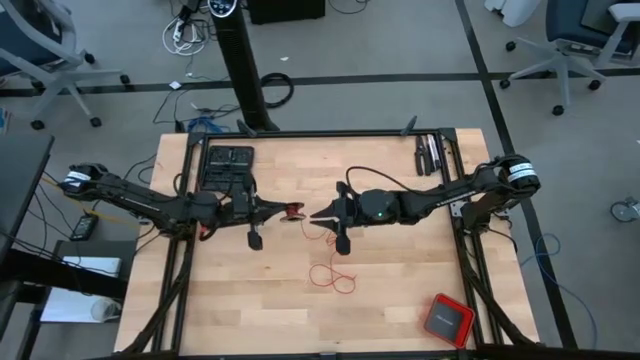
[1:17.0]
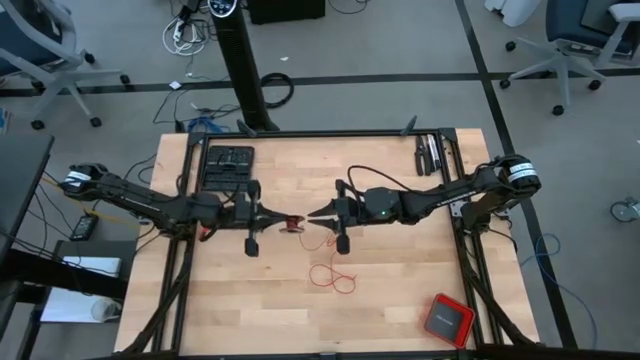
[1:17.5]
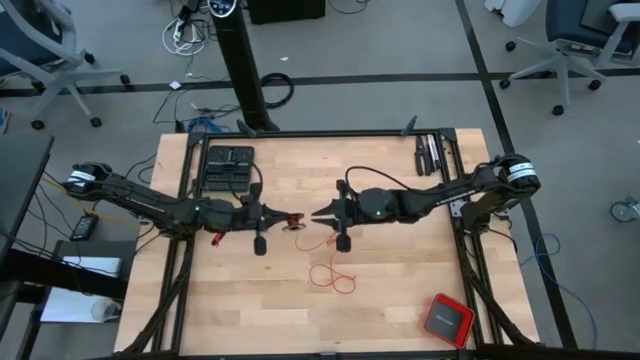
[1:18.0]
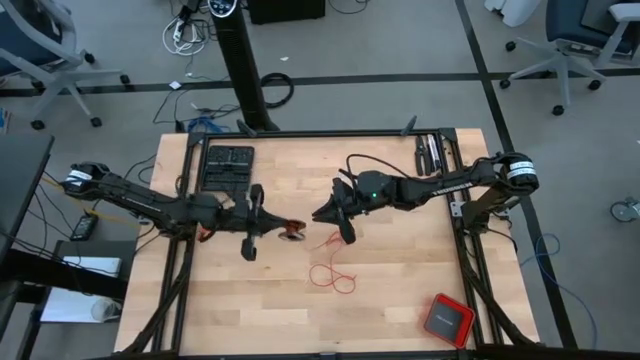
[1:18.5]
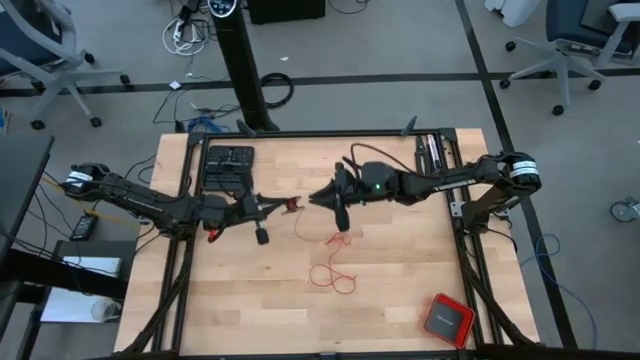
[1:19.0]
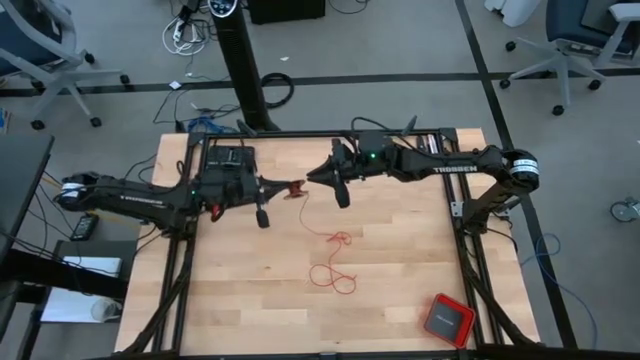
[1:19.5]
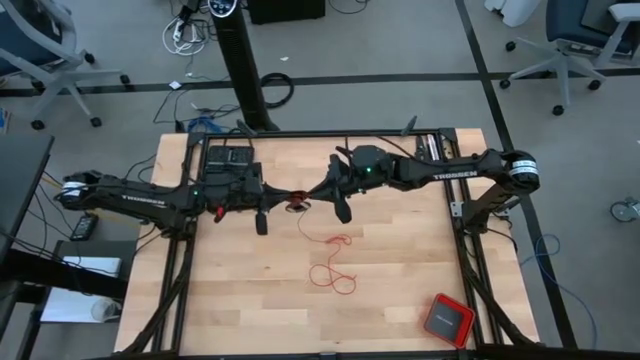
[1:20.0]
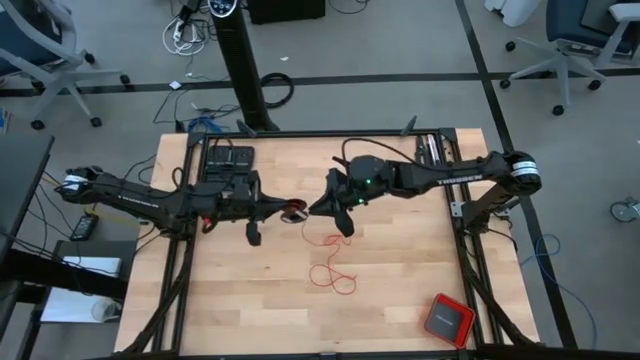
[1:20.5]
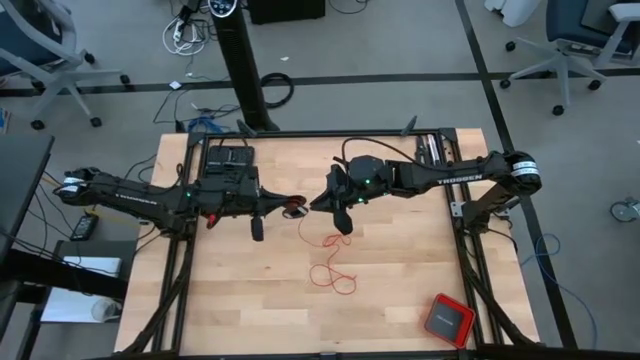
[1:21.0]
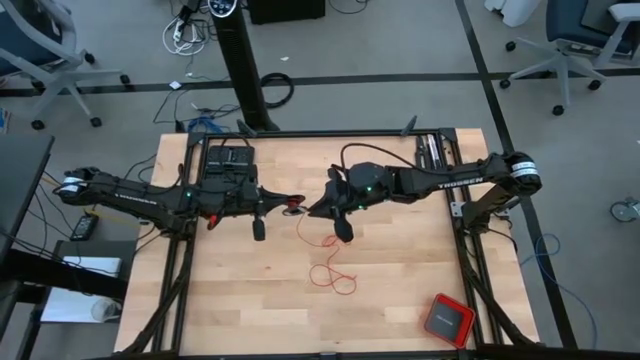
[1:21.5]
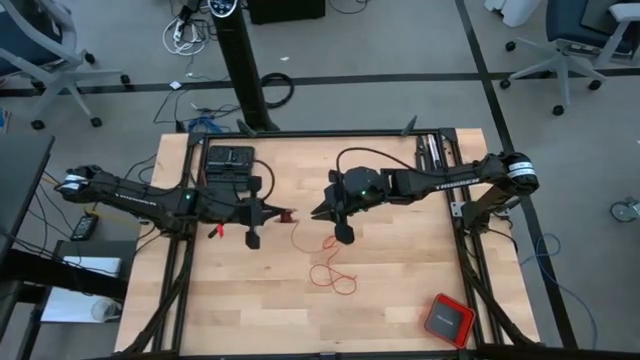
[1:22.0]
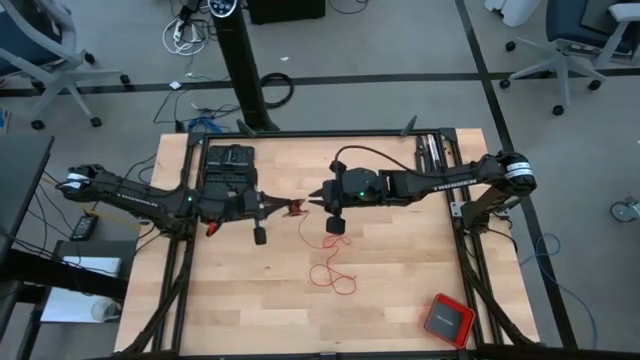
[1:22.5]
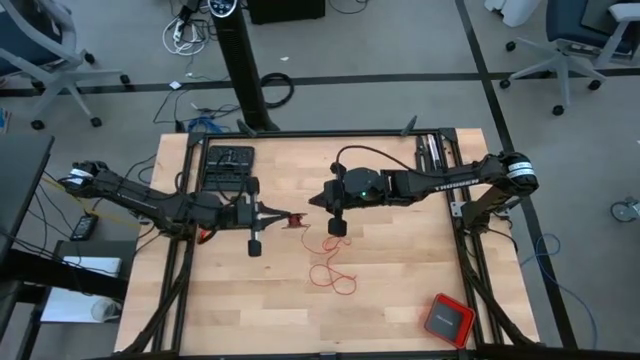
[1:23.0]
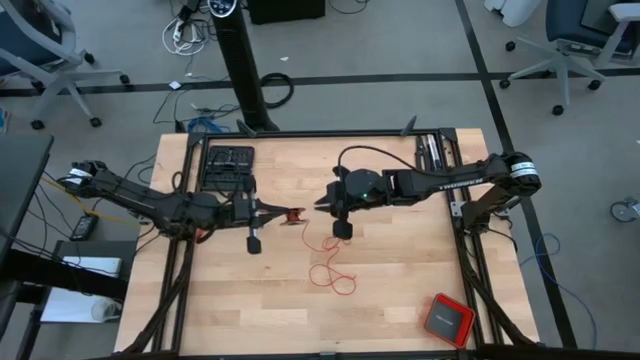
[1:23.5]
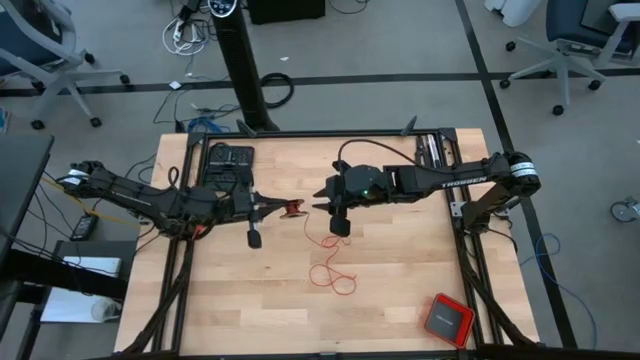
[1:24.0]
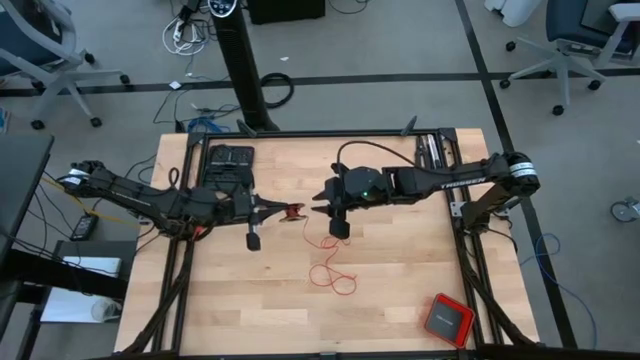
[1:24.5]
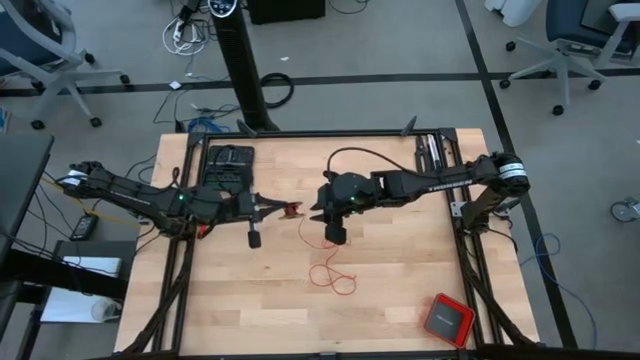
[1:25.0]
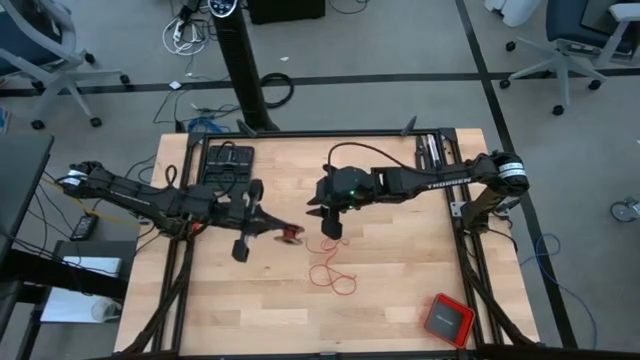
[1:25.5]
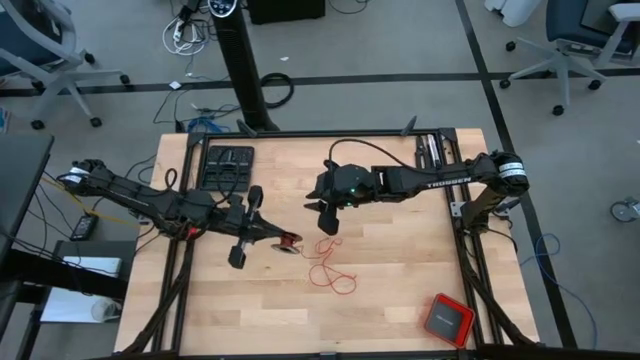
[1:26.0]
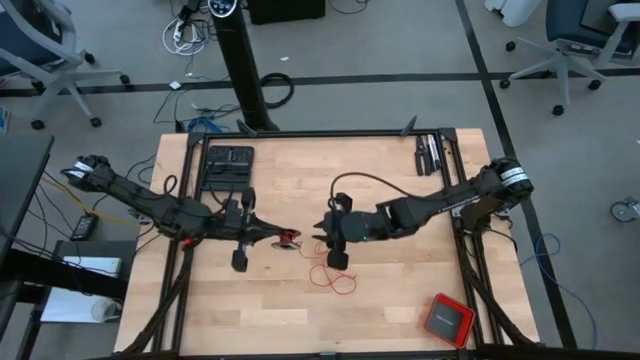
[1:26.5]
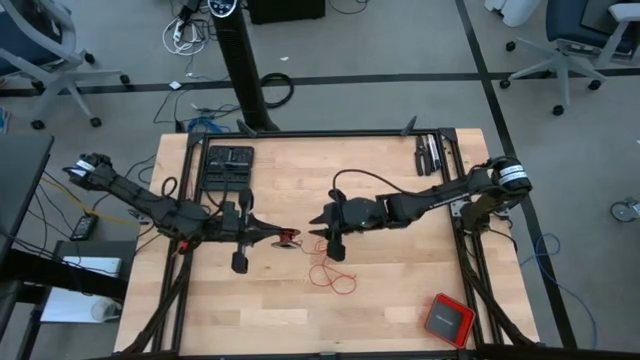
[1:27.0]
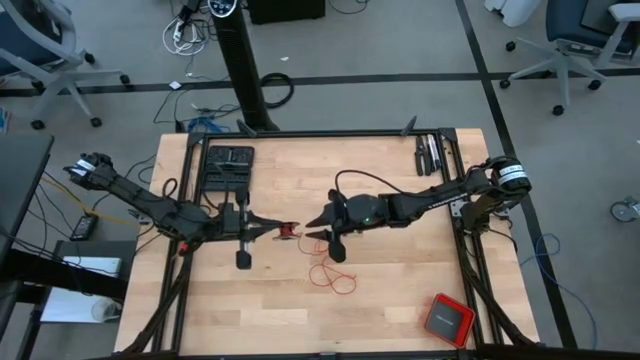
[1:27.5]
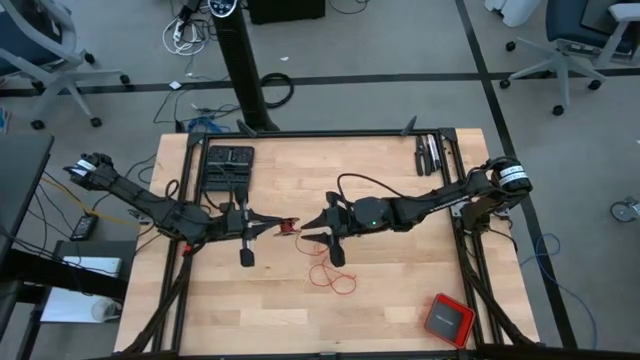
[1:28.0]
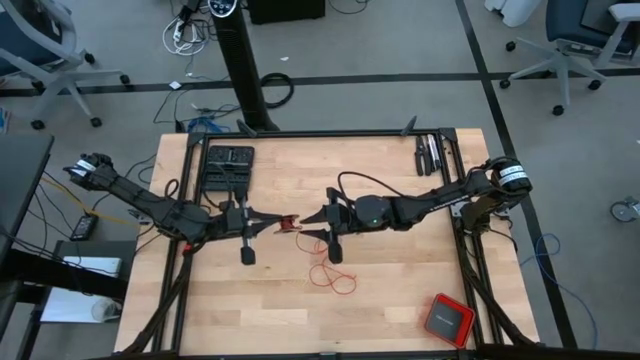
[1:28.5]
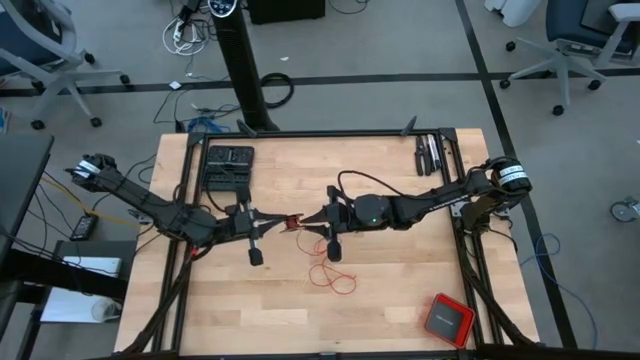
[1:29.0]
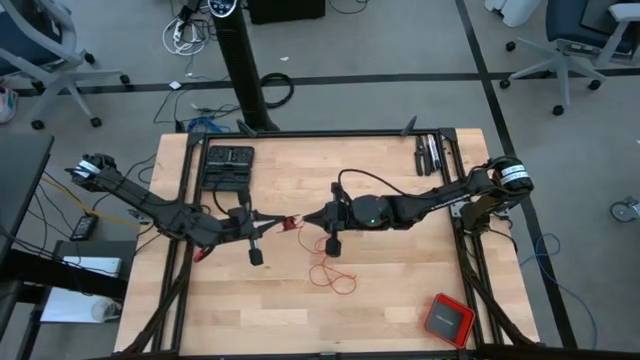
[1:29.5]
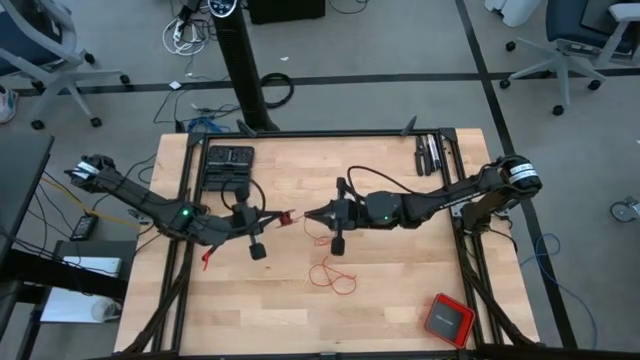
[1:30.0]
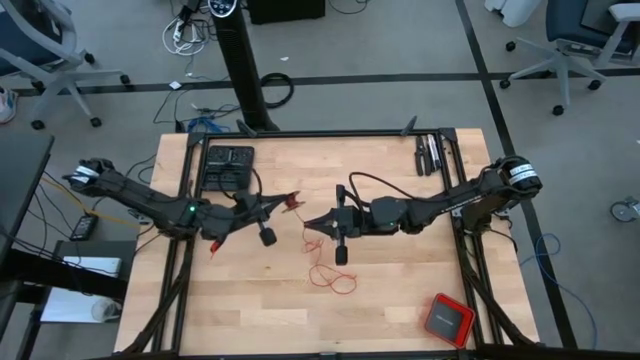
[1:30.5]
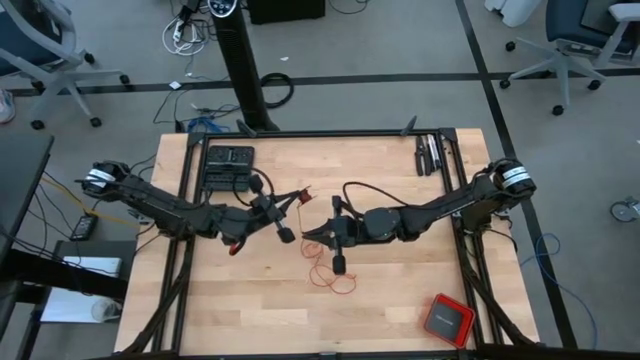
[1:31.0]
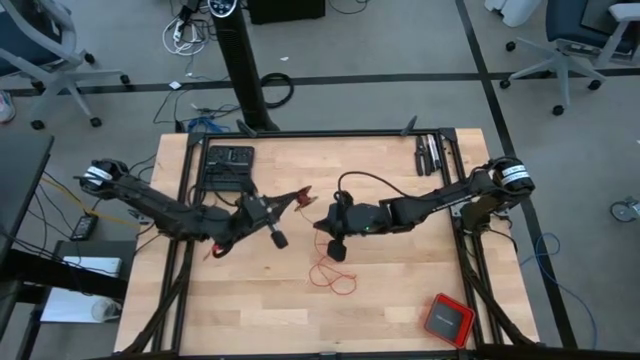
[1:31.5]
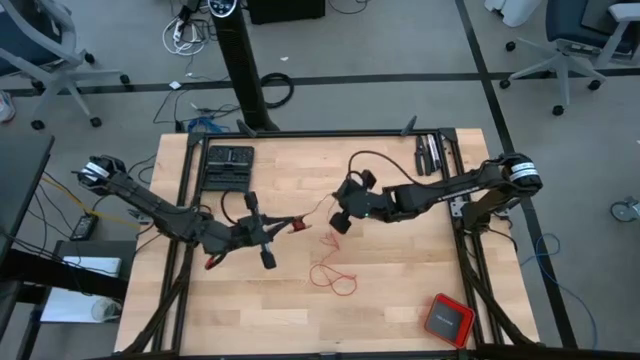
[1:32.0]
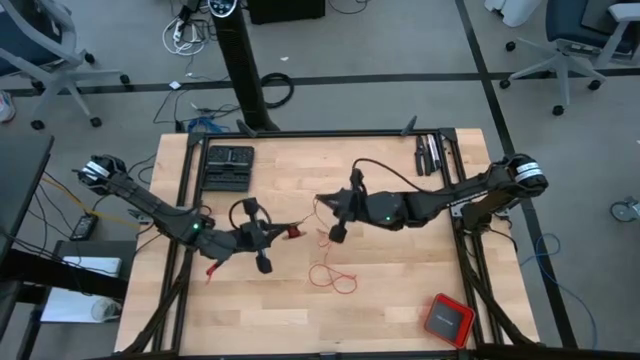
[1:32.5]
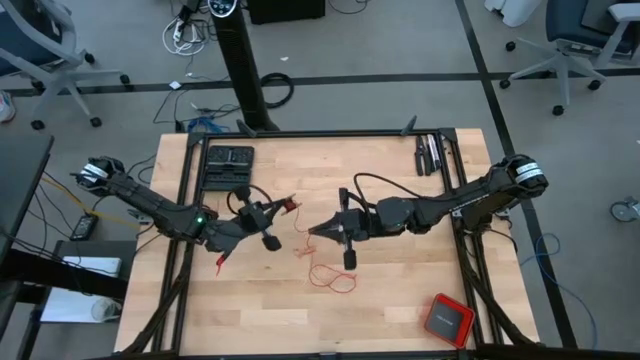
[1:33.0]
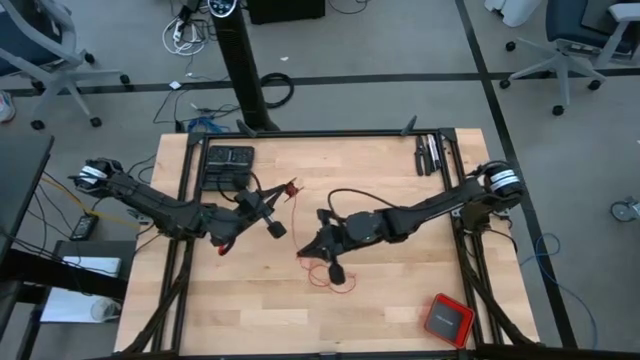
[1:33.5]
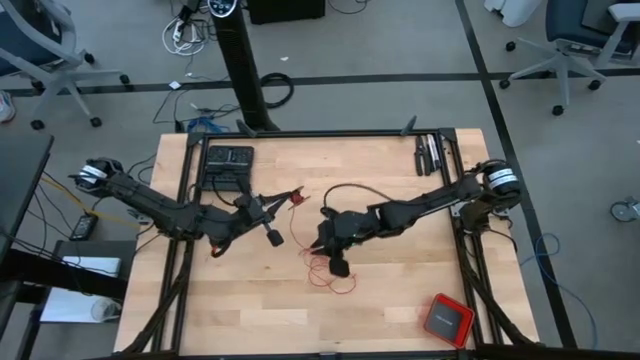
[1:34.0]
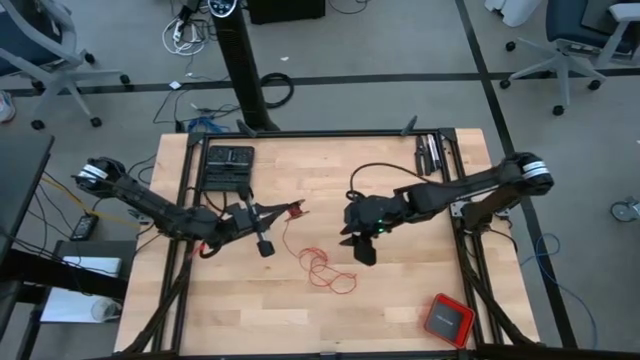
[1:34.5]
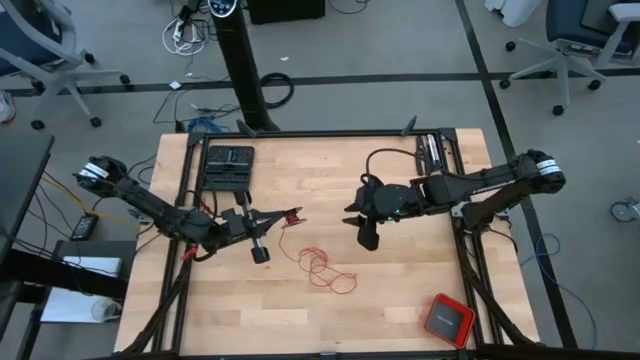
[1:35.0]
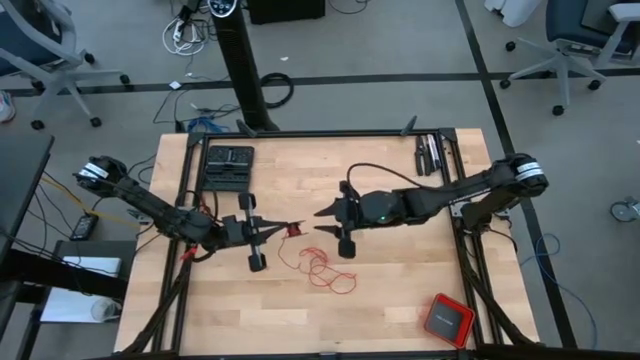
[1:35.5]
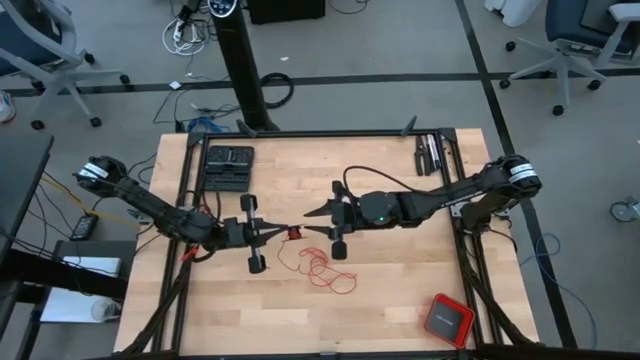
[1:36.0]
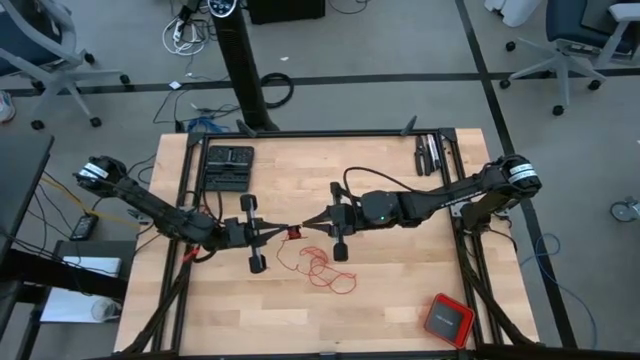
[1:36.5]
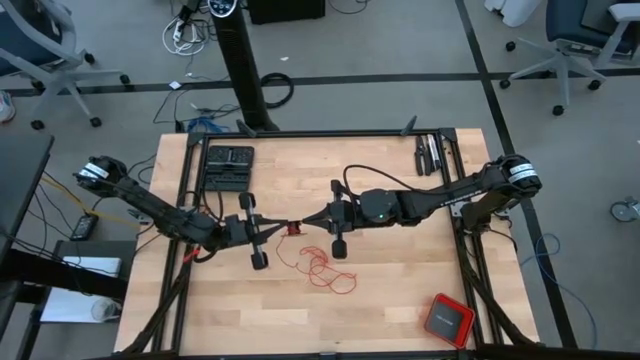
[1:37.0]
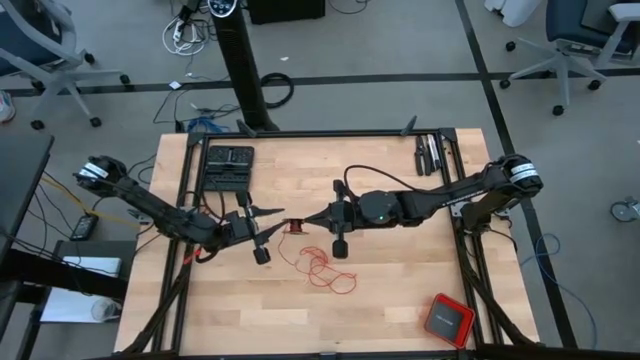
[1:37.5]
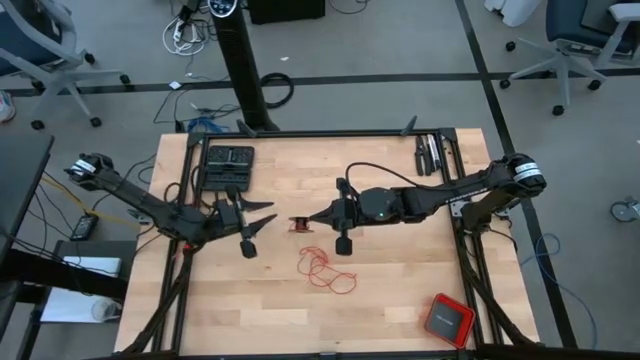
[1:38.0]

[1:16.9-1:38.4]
Task: Coil cords
Uncoil the red wire from the spool
